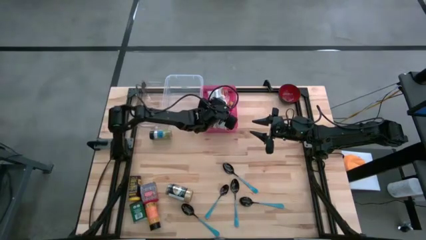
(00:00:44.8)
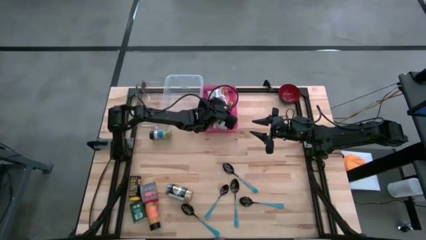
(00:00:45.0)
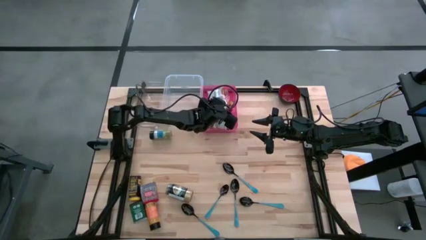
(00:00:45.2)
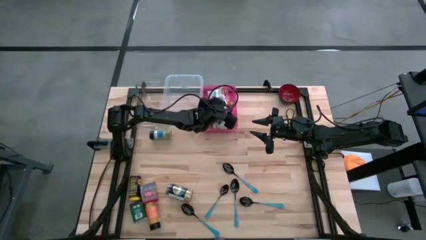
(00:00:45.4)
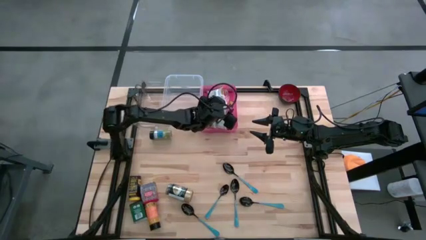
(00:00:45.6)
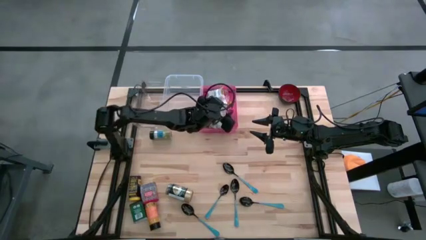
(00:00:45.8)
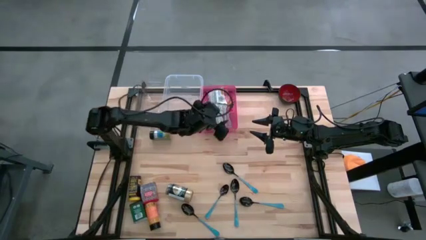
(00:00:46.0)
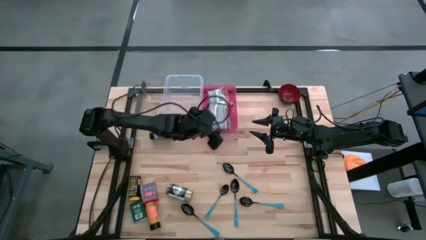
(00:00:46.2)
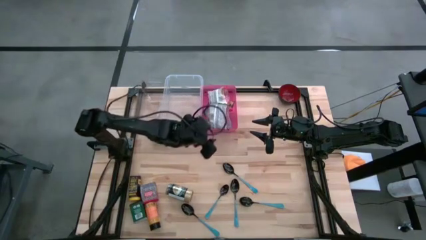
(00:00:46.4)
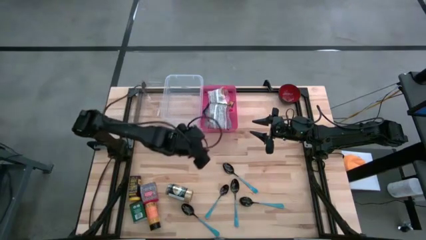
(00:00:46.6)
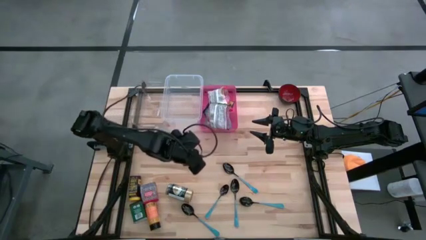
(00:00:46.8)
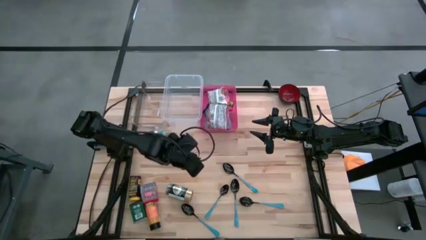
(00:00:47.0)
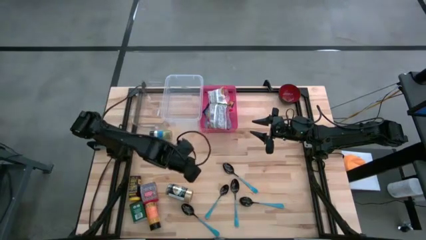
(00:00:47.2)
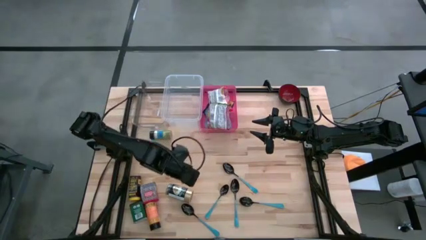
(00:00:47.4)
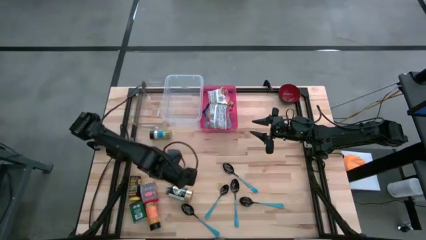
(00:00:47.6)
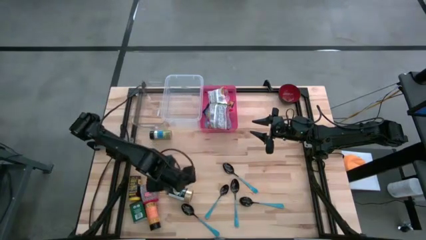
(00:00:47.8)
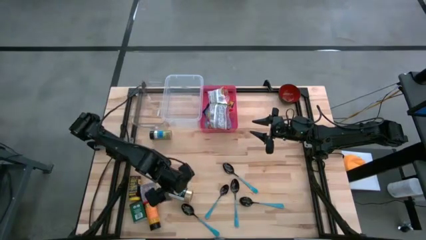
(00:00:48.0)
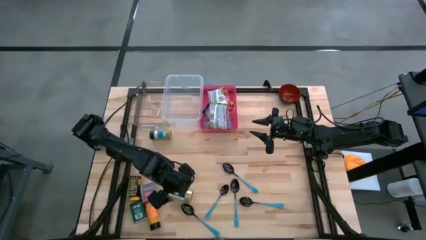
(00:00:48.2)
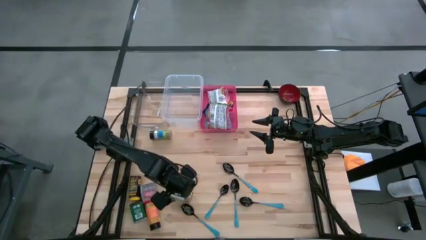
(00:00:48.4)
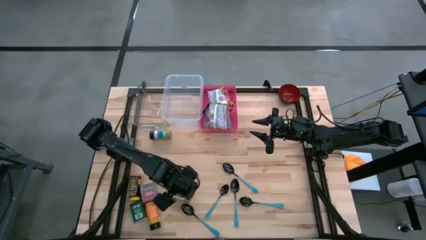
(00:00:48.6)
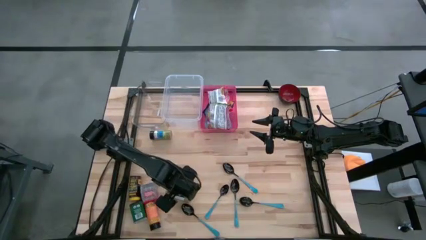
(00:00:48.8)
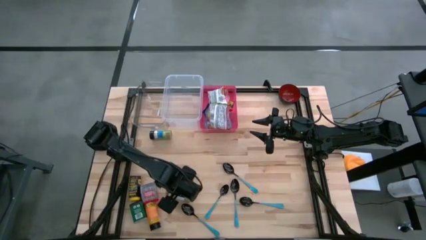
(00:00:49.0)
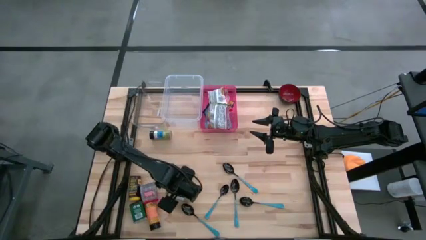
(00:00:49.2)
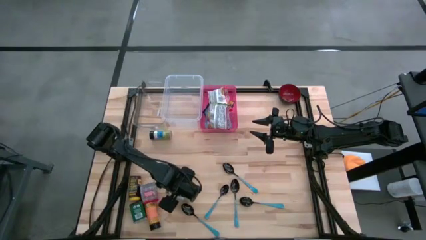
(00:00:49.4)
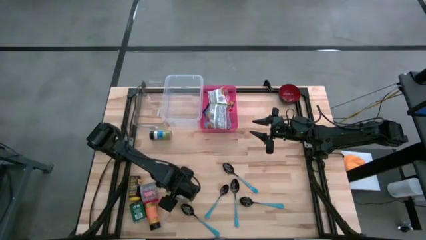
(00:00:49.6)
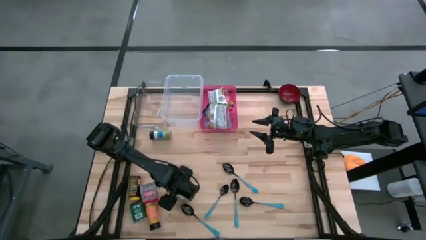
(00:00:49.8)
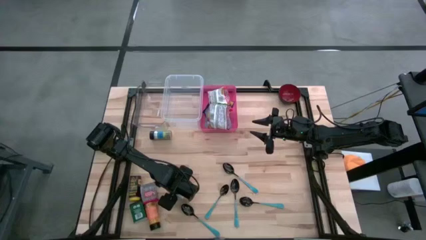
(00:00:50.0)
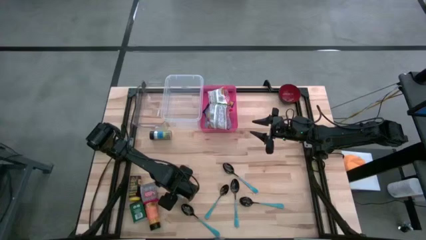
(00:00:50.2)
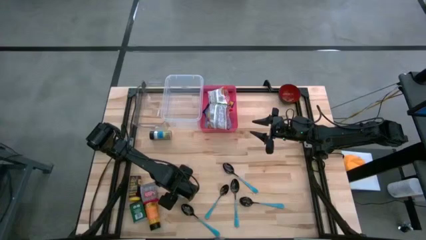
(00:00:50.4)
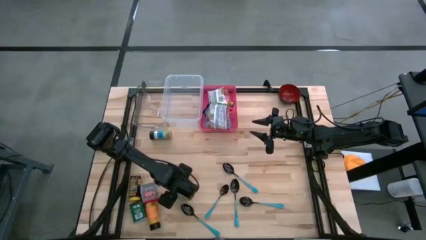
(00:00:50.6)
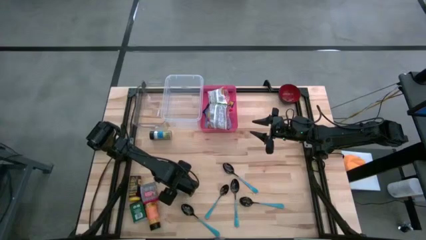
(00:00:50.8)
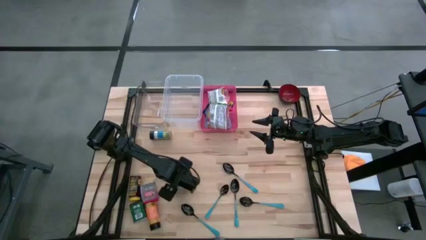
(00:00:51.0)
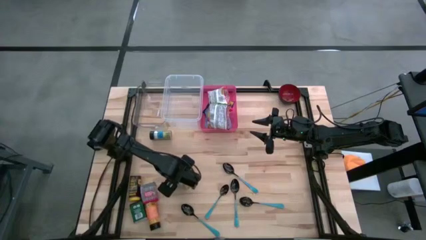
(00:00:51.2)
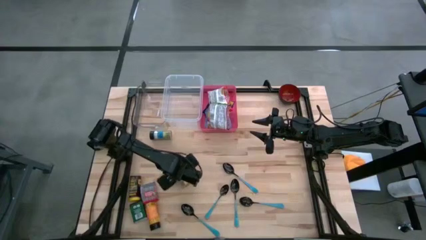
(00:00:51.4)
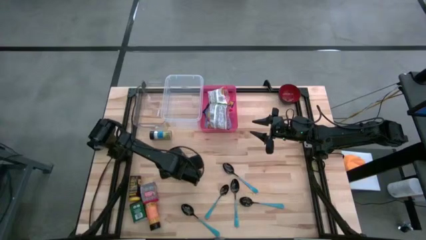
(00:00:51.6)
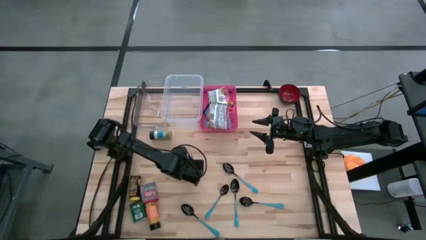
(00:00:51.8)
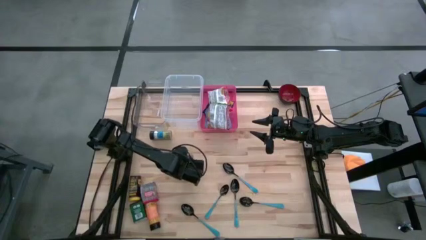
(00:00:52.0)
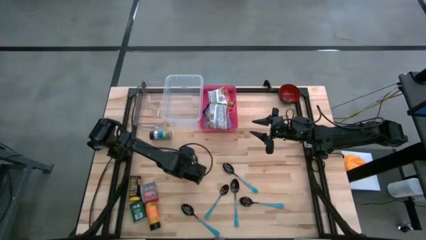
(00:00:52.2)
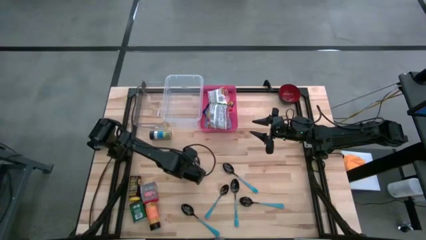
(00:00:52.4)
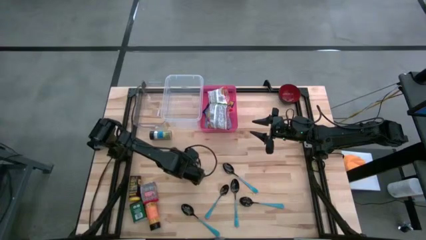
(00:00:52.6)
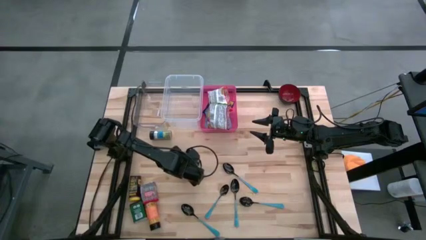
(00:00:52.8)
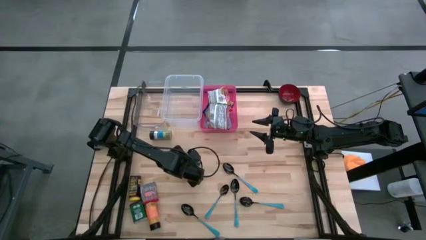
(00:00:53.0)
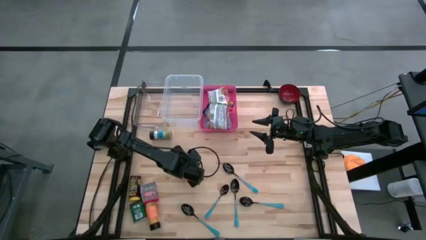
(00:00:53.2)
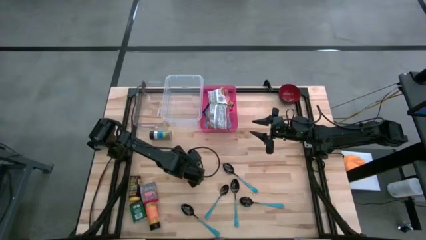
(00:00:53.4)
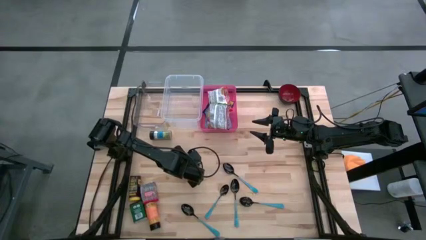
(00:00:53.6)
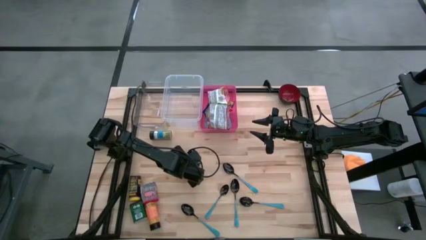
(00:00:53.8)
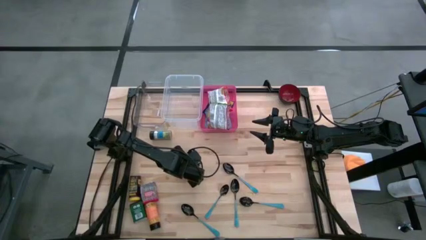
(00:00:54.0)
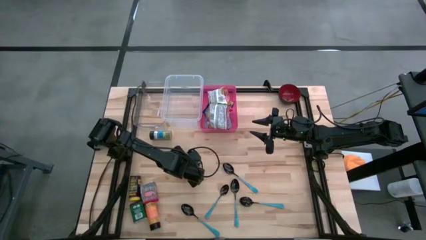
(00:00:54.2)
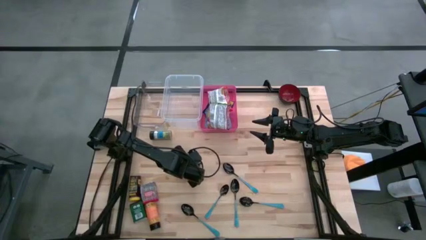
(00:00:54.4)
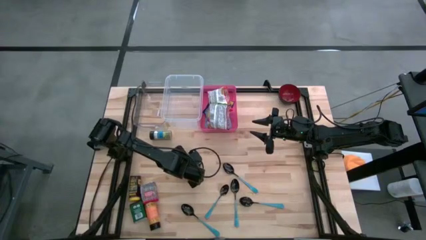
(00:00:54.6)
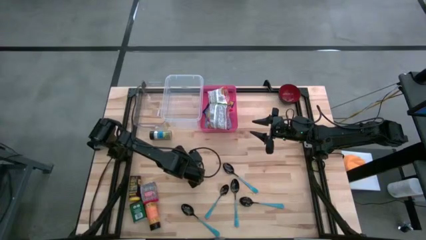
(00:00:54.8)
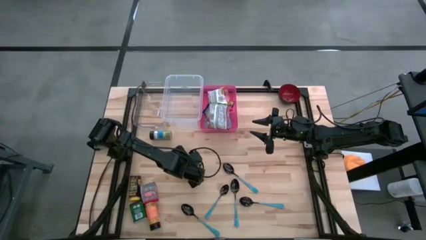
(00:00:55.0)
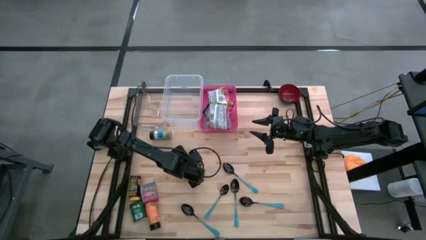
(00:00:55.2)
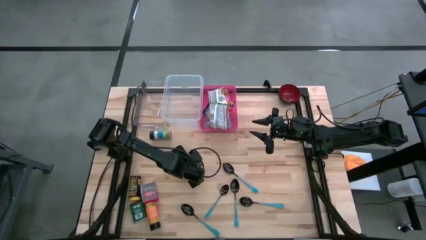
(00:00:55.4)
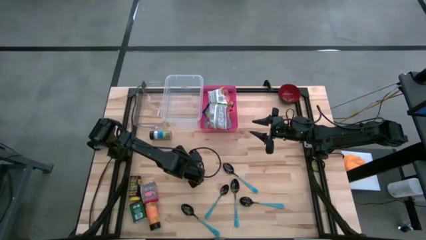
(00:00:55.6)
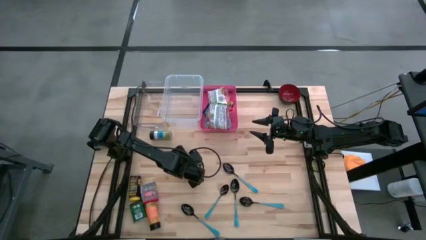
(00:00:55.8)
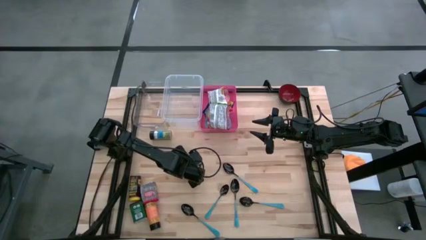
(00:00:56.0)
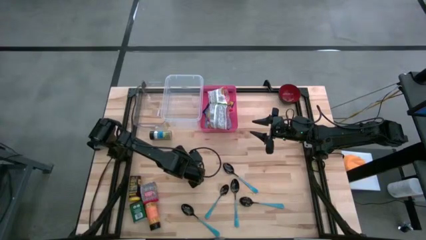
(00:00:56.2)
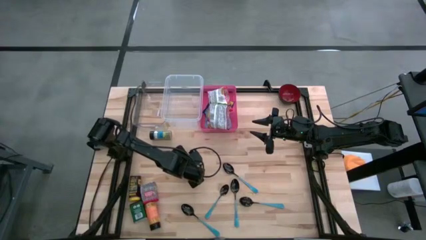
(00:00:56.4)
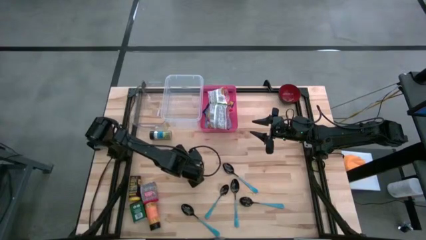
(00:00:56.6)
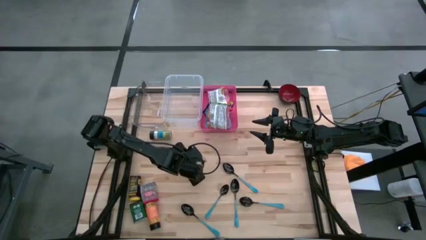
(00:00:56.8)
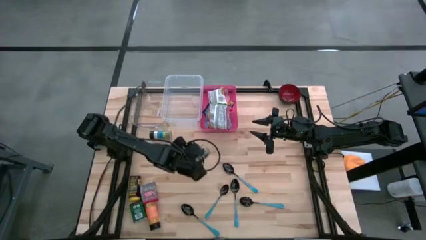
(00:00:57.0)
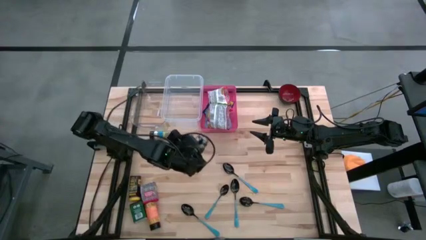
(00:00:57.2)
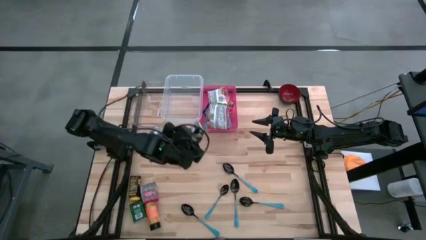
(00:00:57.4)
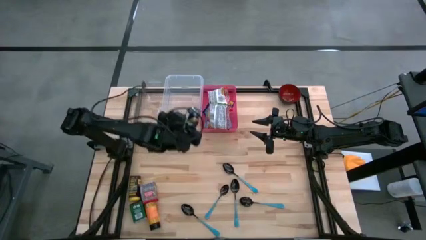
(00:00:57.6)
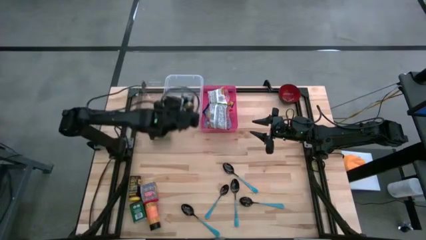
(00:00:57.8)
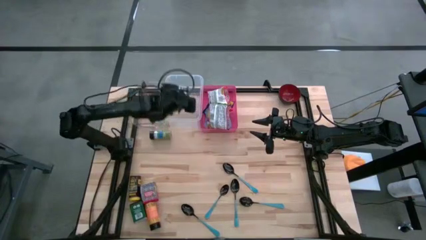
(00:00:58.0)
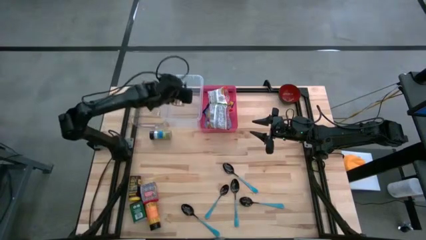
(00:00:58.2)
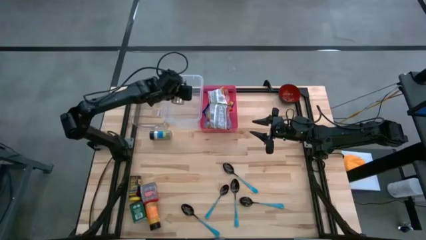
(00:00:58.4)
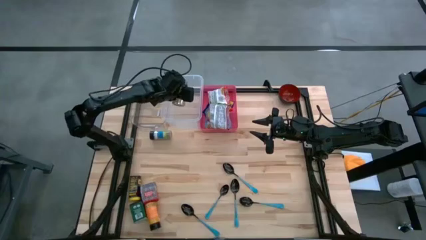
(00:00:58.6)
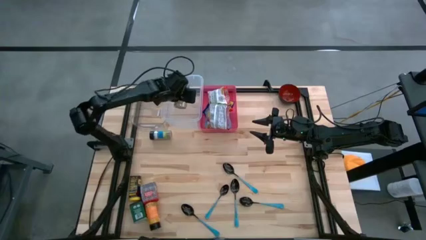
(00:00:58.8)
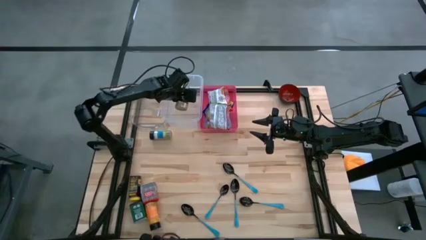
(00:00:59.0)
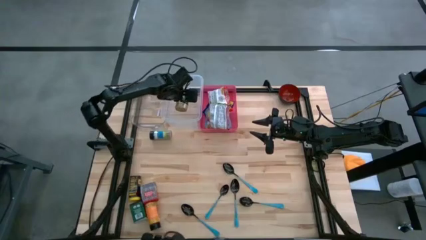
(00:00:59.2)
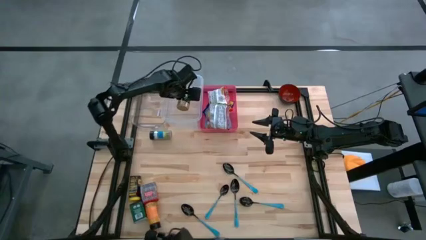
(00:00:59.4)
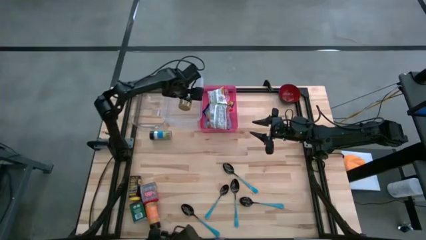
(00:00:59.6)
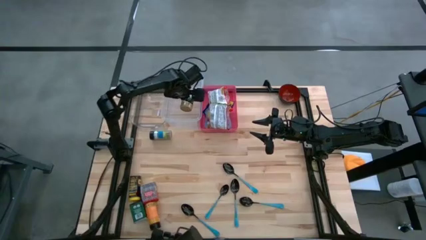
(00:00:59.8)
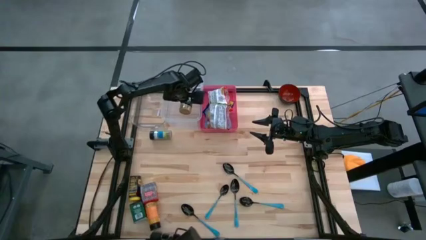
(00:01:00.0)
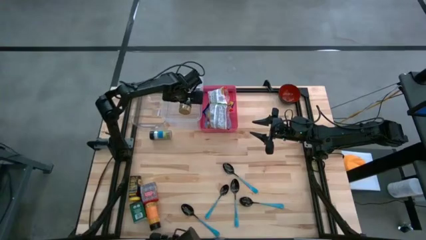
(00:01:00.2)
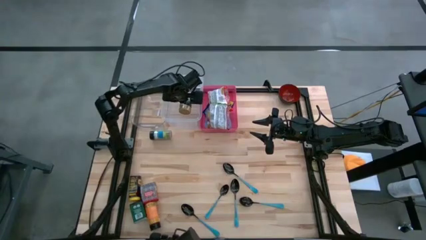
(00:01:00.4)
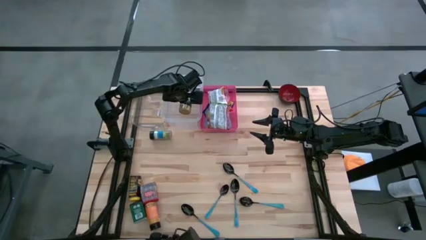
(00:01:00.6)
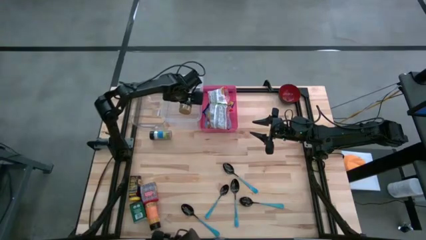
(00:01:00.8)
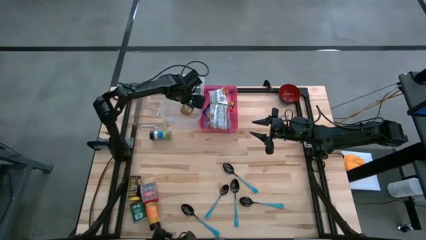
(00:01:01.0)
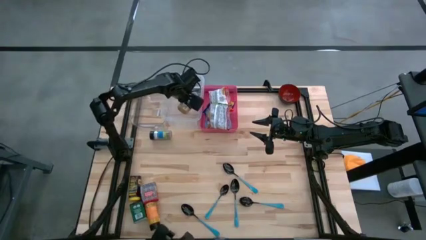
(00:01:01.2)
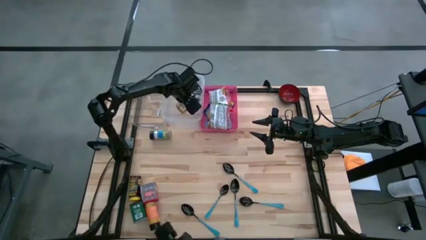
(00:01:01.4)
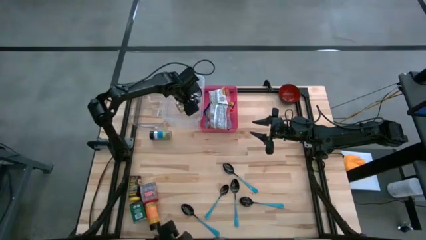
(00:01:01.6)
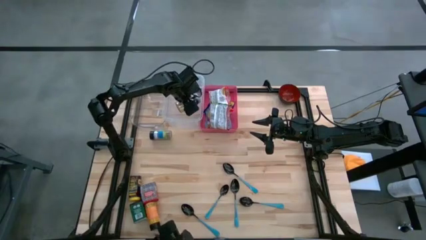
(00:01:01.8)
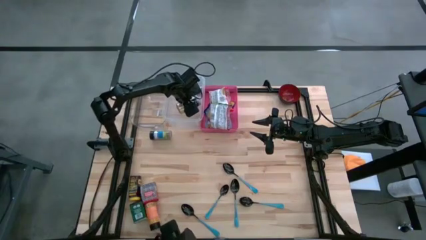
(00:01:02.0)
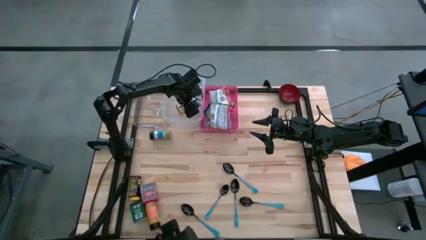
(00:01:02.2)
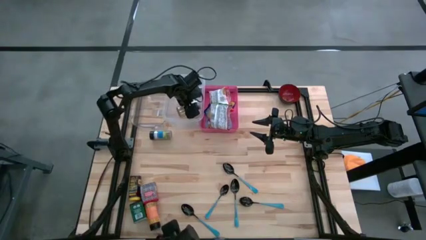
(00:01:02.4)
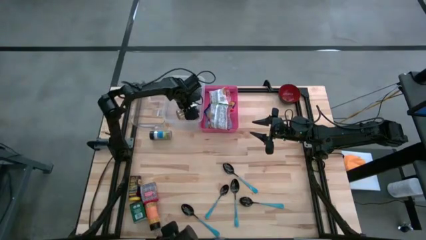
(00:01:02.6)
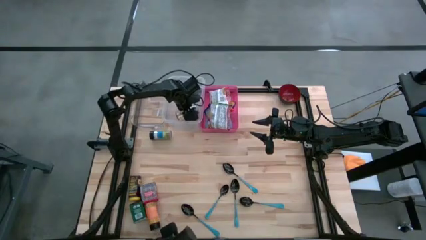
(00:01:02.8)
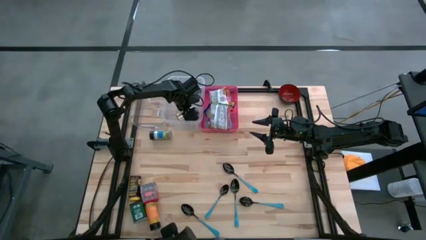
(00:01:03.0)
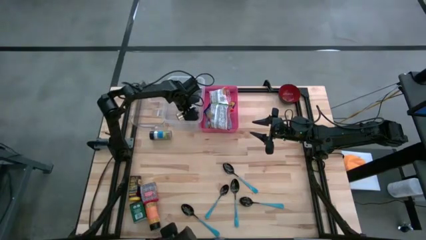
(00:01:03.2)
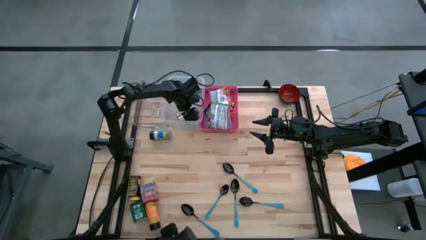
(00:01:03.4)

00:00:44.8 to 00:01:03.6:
Put the gold seasoning bottle into the right transparent bin
